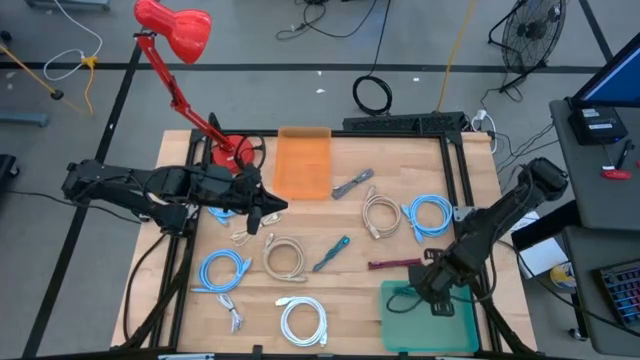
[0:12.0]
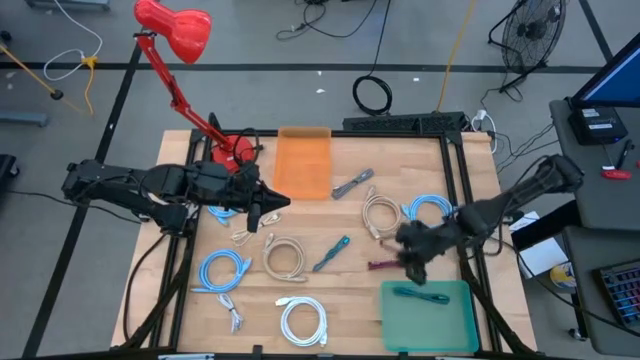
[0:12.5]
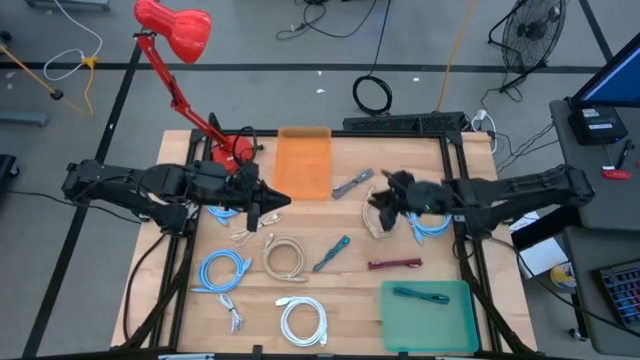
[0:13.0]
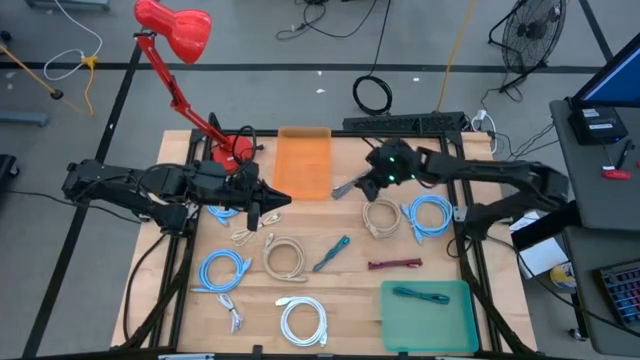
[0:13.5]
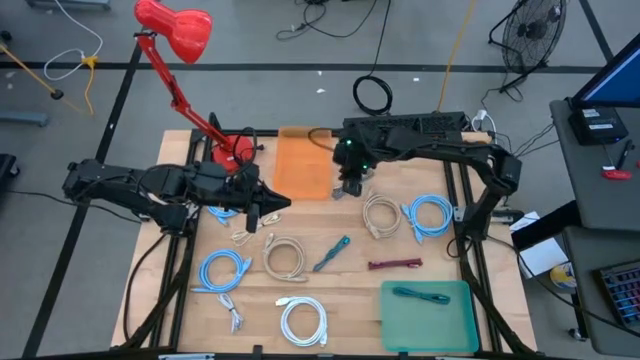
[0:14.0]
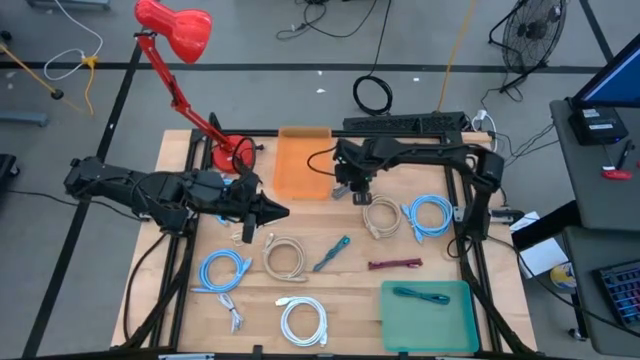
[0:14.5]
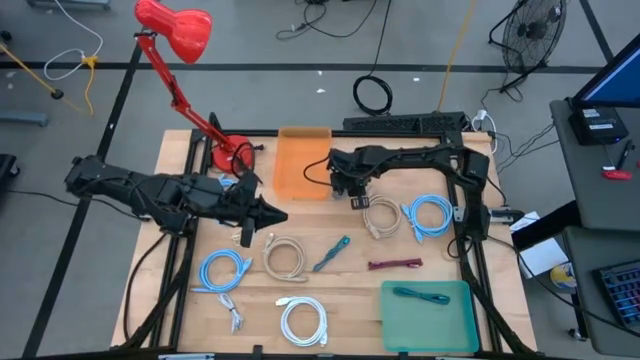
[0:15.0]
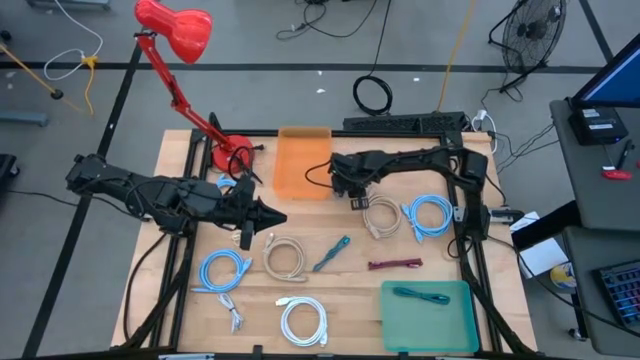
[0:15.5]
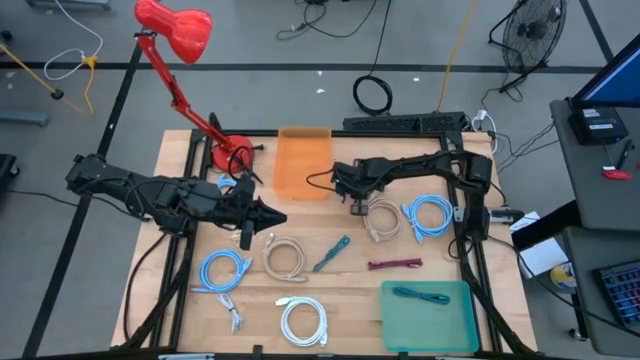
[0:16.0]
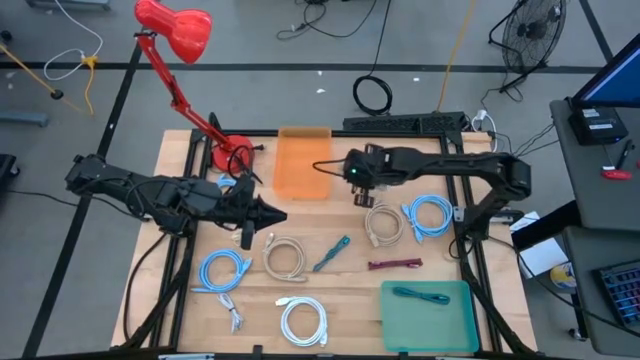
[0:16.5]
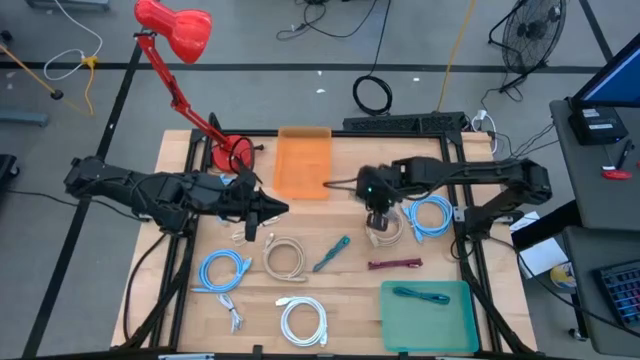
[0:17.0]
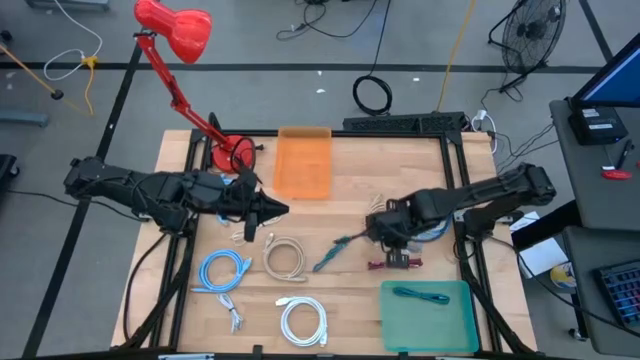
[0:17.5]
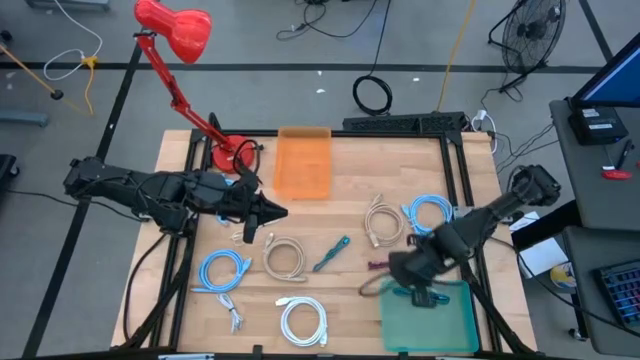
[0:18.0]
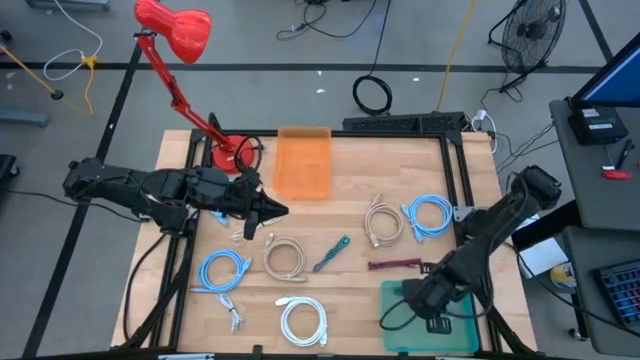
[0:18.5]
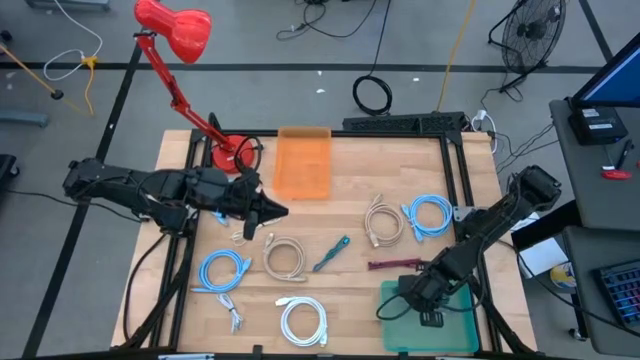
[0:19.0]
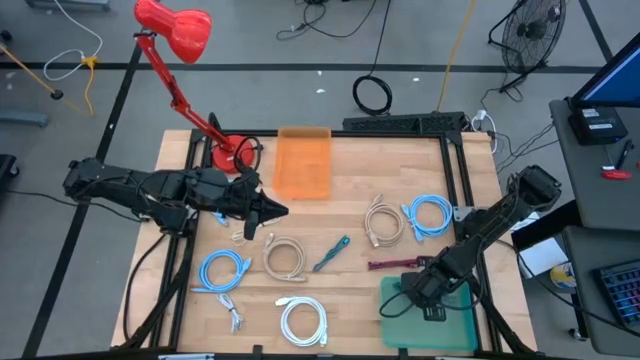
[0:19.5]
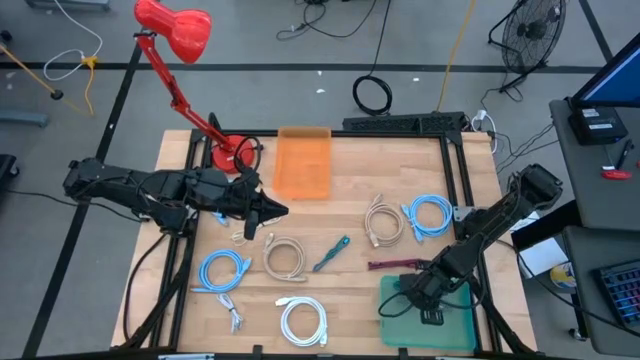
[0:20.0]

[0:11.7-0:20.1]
Task: Pick & Place USB Port
Put the white black charger cable into the green bin

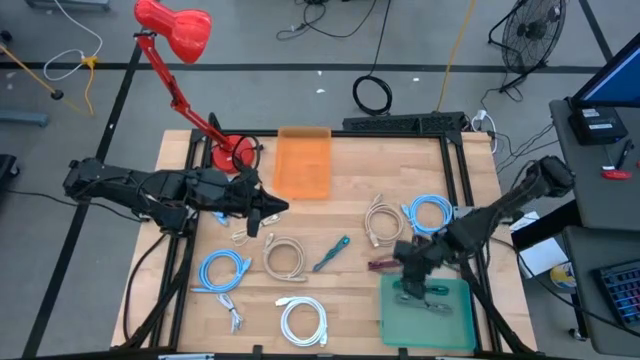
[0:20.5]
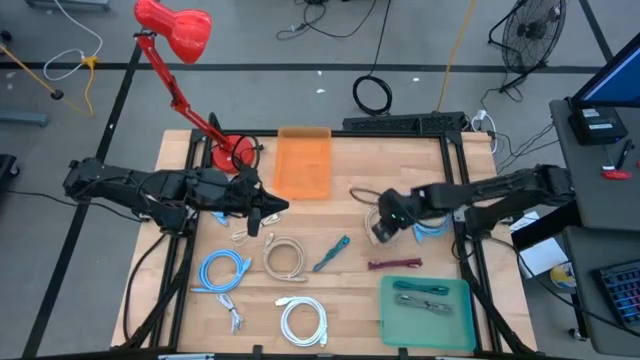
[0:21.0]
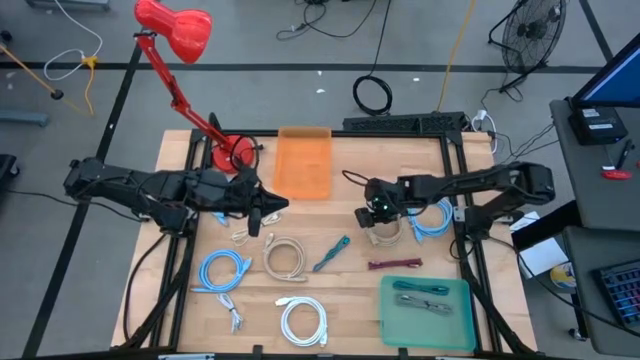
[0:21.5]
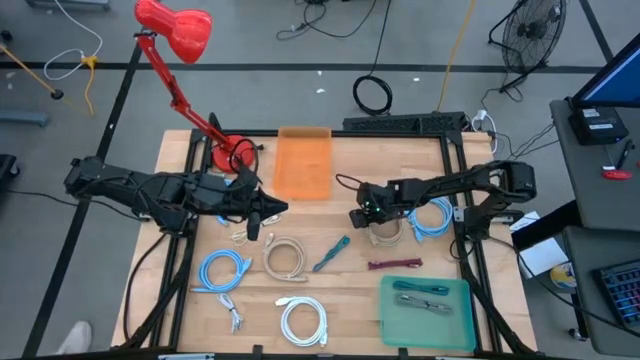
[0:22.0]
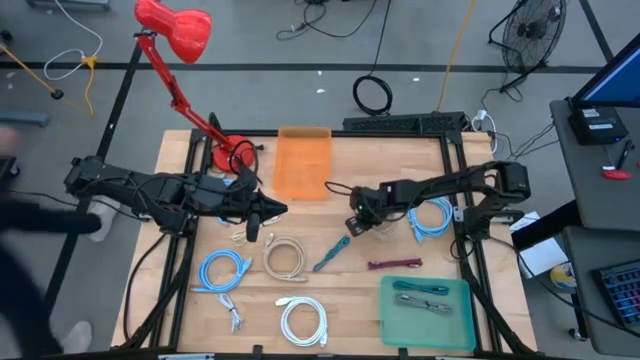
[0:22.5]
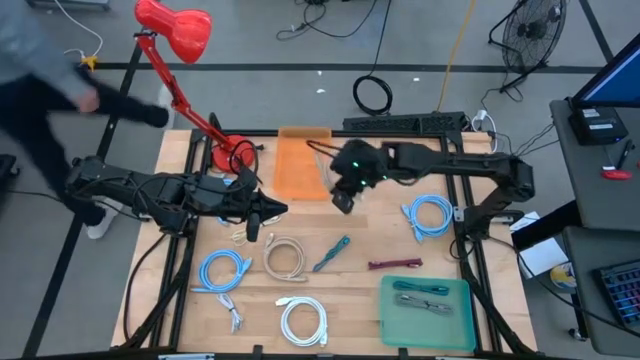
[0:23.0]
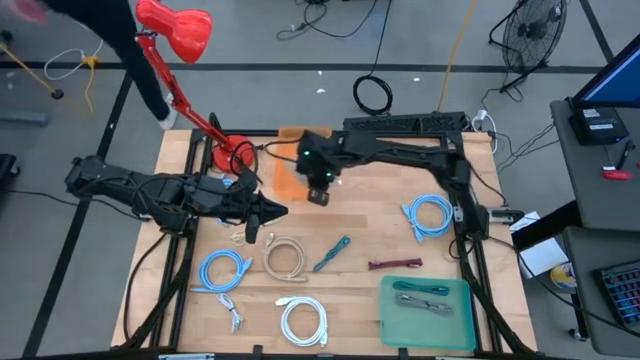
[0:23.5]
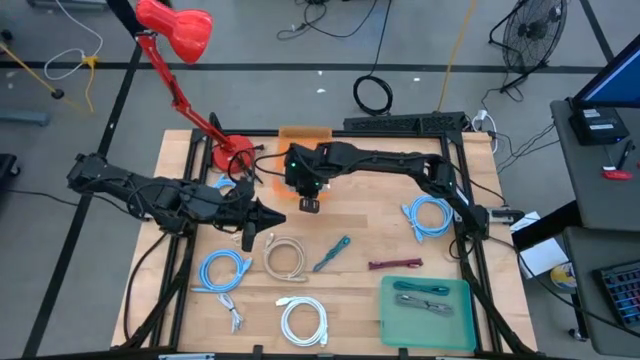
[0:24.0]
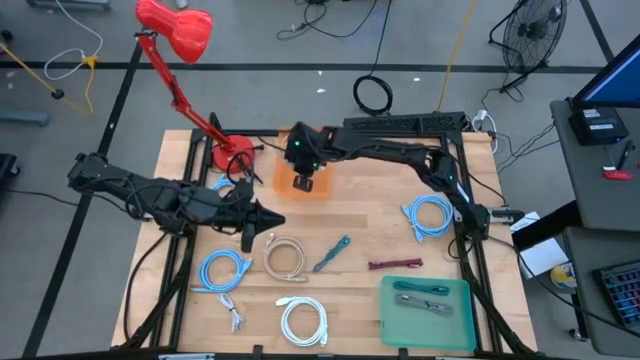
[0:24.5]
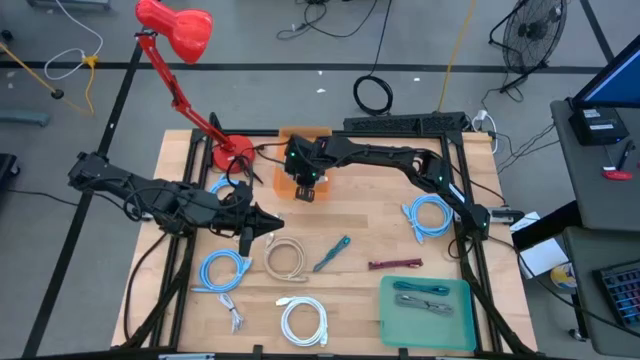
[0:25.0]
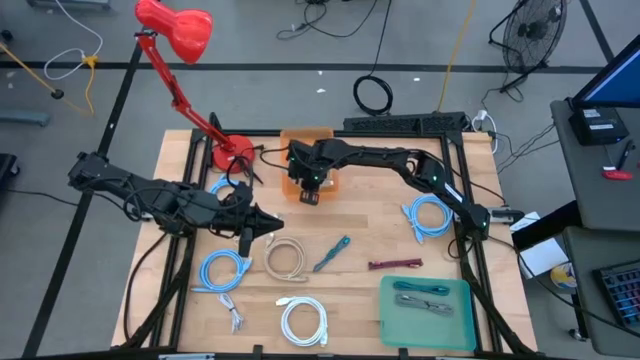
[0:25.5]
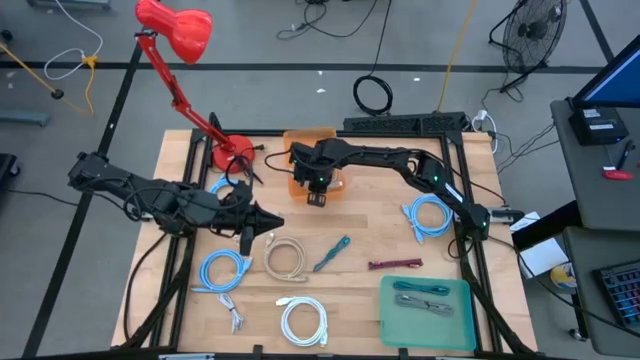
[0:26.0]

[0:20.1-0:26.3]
Put the right light brown wire cable into the orange bin

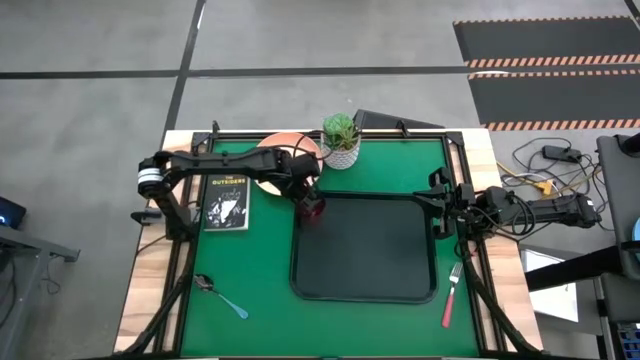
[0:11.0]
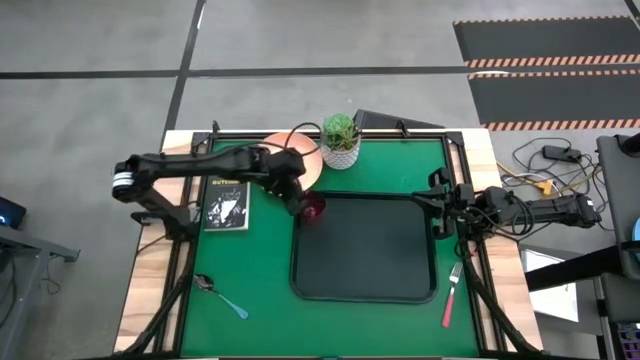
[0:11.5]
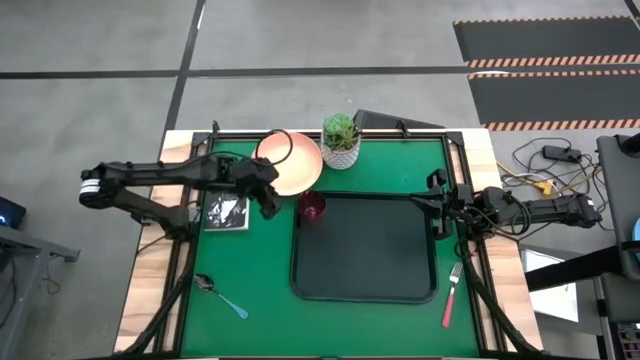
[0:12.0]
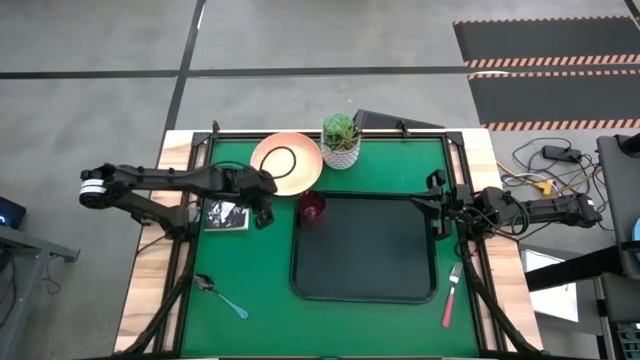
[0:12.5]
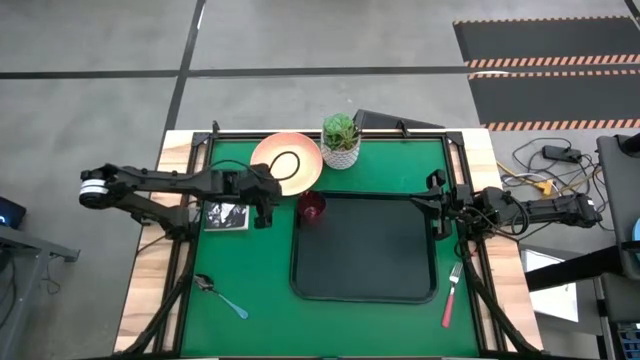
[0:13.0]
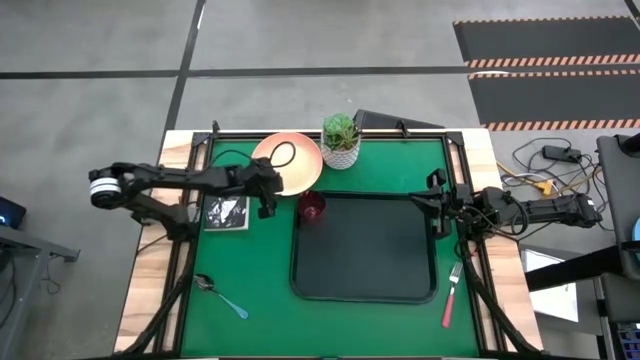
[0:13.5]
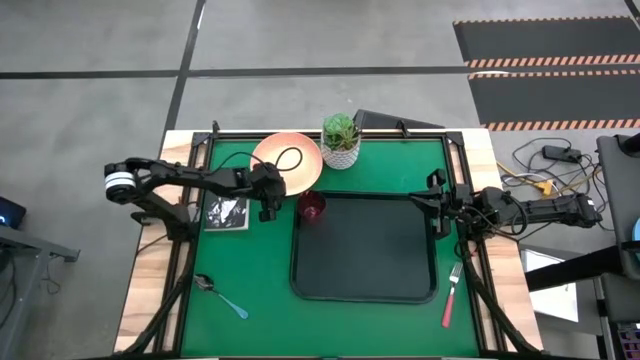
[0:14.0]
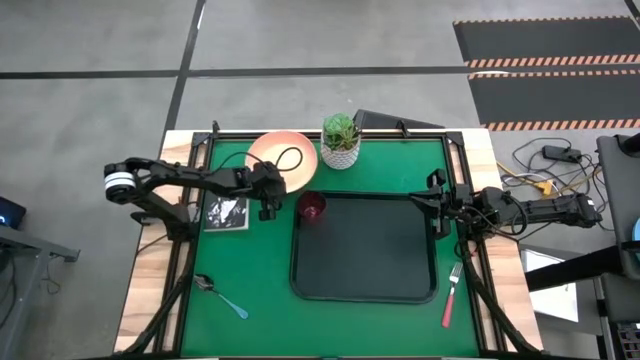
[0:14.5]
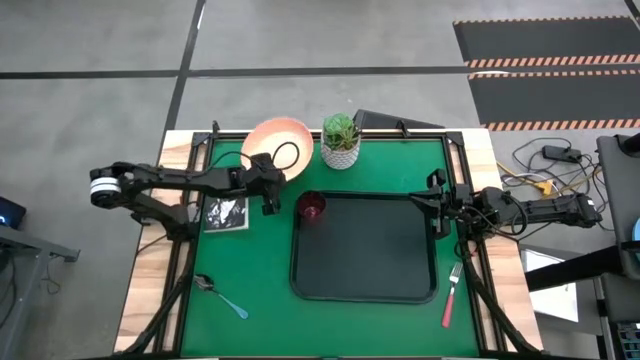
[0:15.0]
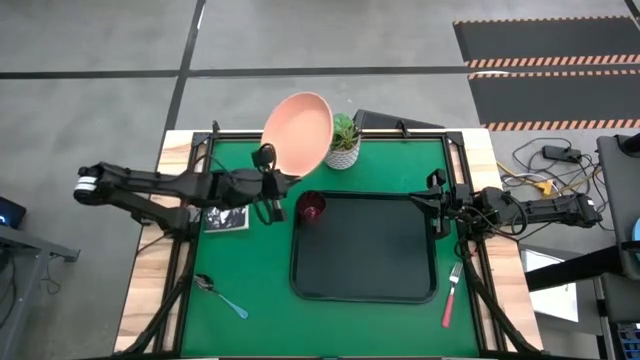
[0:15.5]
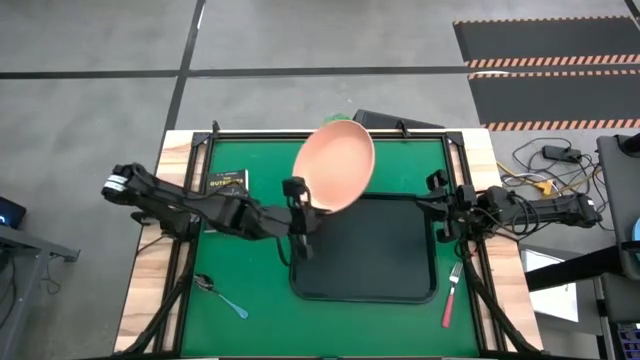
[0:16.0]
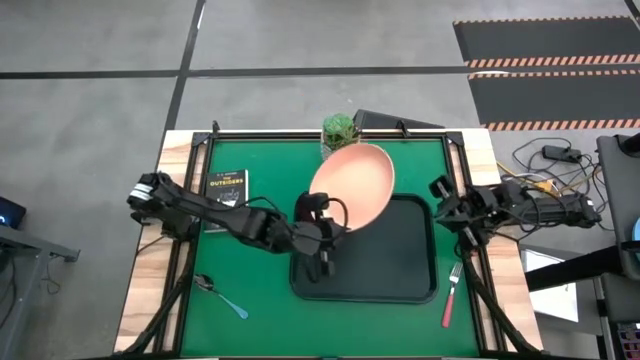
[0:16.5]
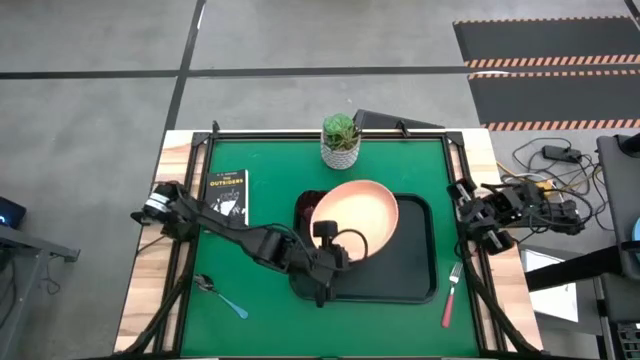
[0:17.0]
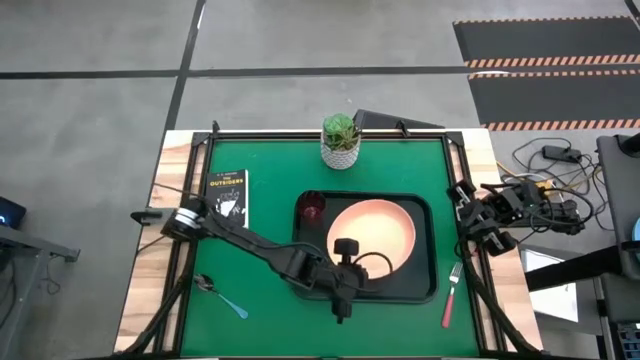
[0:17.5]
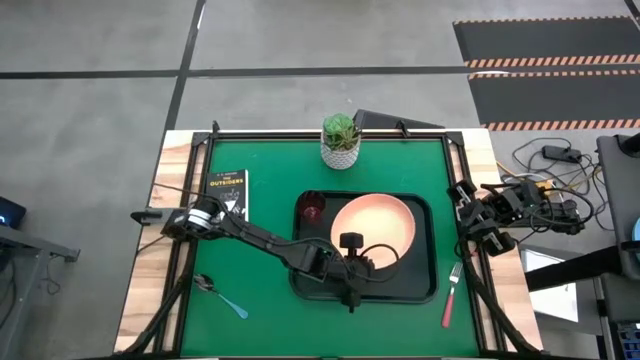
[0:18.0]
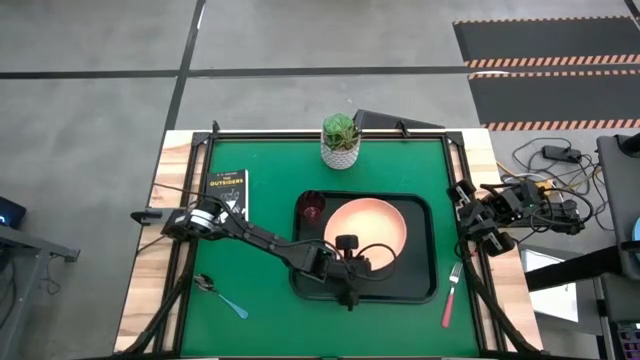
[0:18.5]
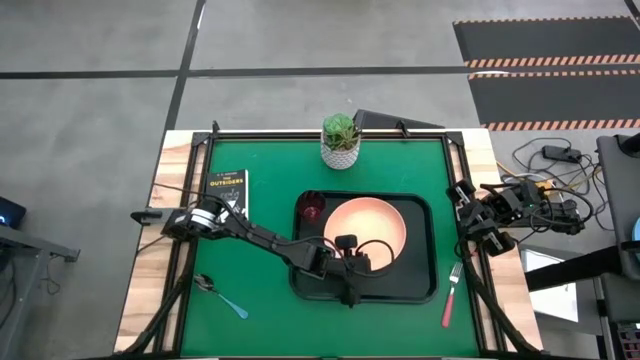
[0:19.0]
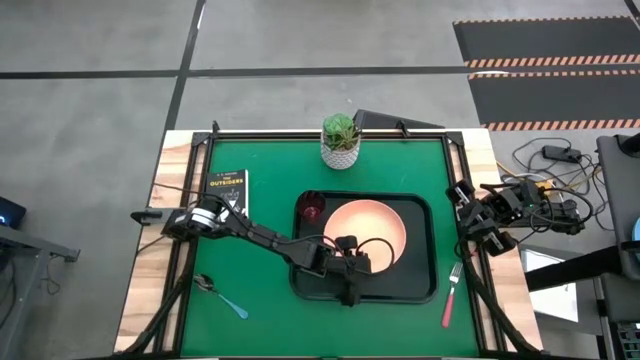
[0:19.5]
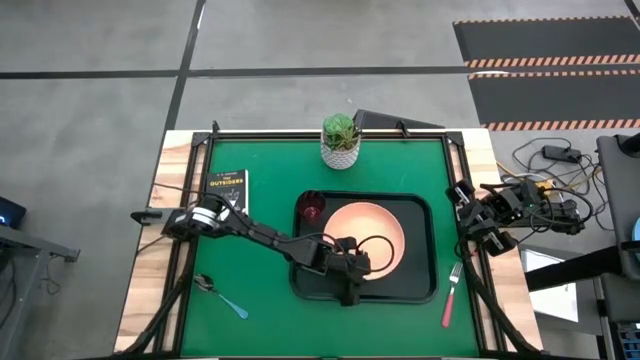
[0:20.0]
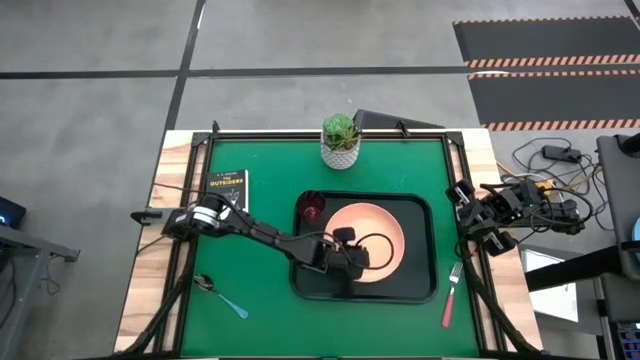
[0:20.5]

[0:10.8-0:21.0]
Task: Pick and place plate/cup/fork/spoon on tray
Put the light orange plate on the black tray at the bottom right of the red glass
